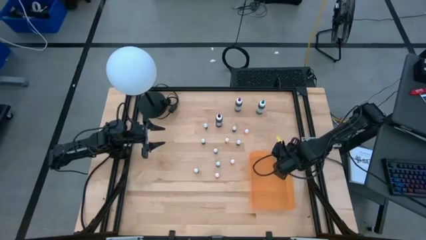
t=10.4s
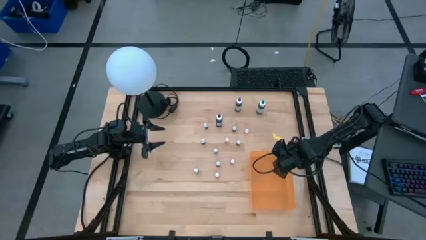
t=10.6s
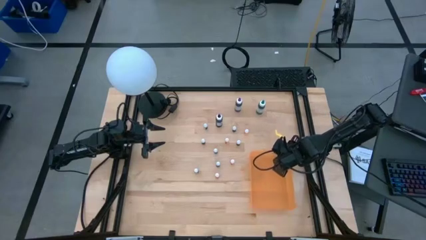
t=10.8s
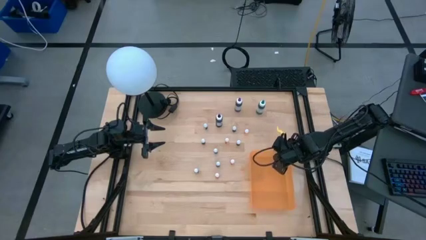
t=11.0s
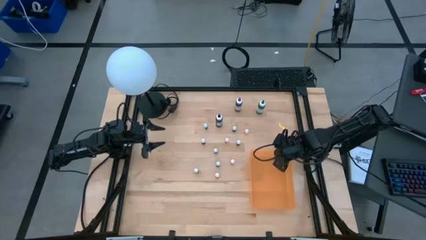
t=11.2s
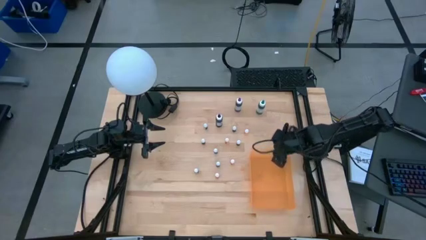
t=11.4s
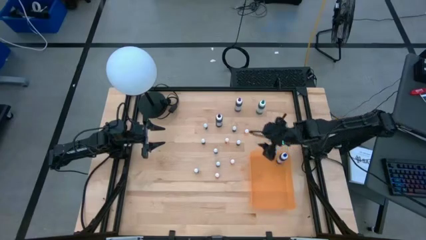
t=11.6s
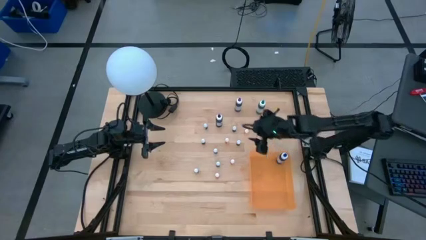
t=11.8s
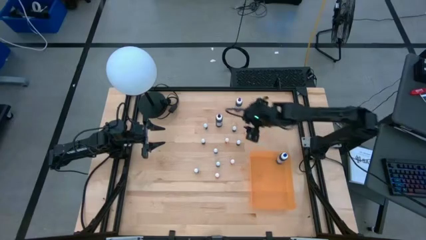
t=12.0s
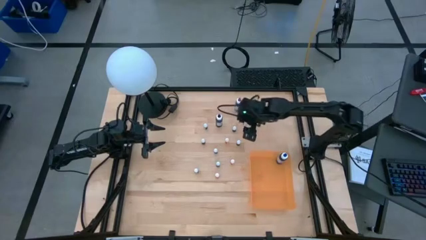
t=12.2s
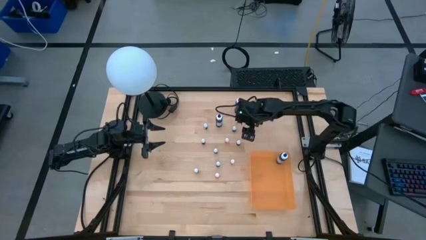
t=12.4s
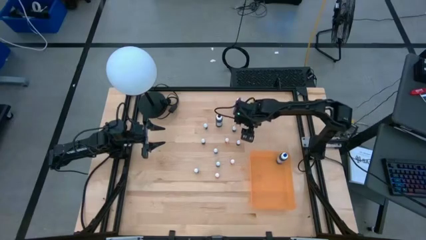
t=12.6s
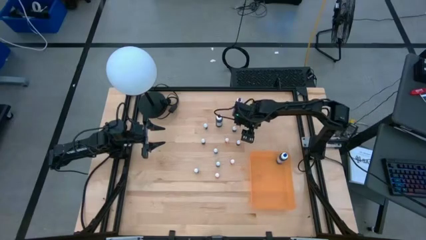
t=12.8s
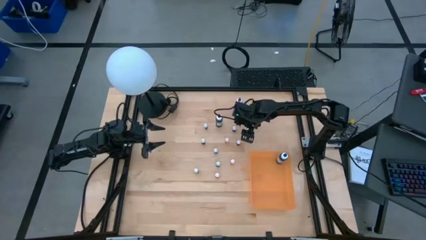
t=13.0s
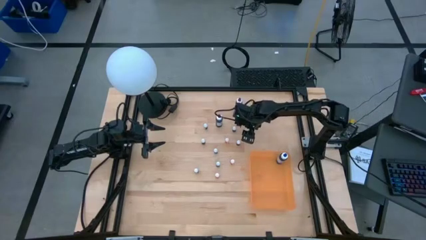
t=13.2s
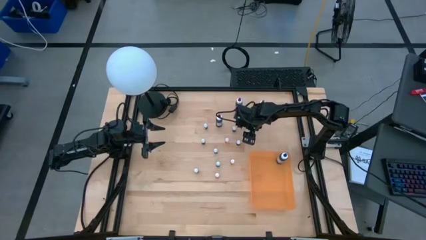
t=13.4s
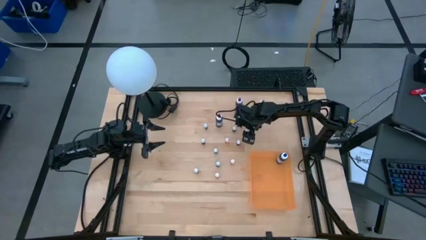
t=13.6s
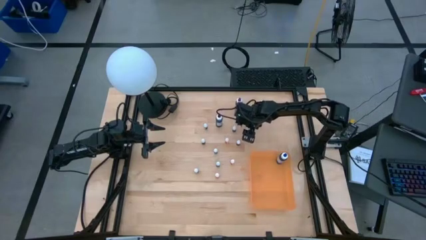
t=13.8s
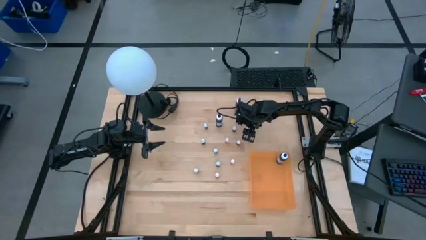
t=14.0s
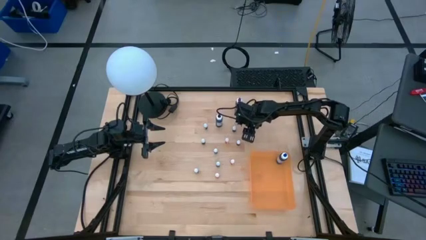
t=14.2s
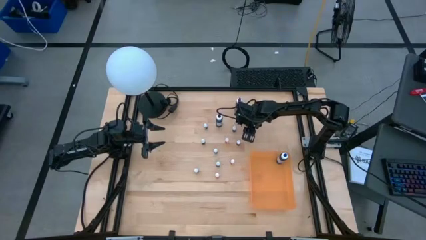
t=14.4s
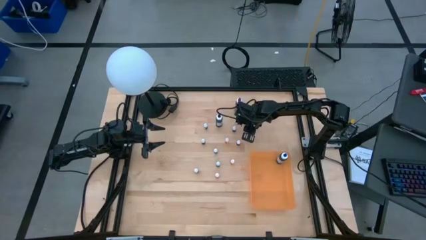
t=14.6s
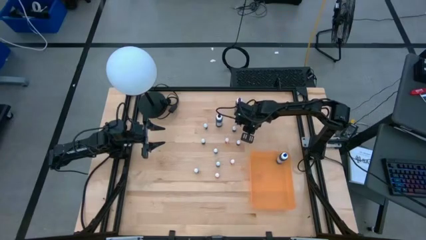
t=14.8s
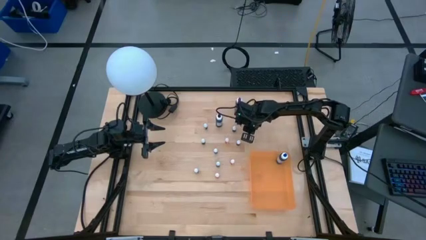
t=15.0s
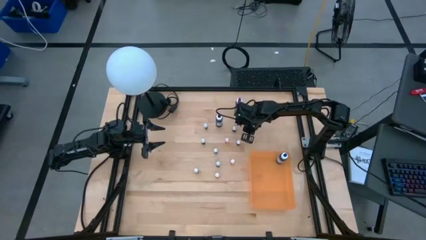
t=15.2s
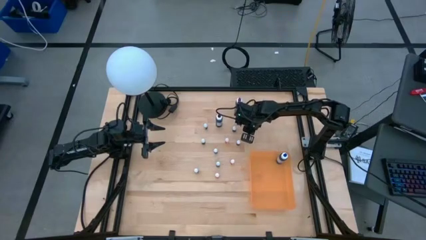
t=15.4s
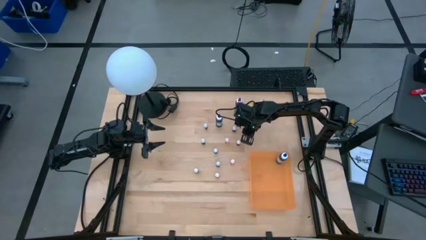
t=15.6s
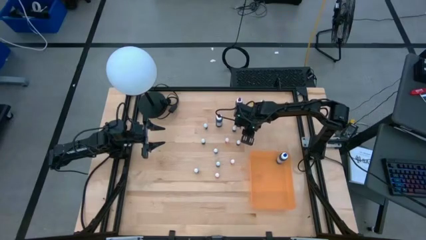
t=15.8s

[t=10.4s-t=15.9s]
Task: Pick & Place food coloring
Put the small yellow food coloring bottle into the orange bin

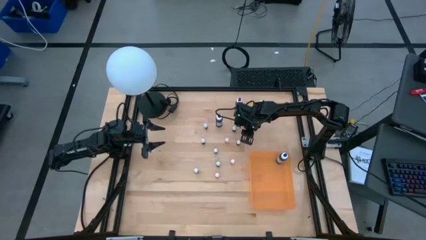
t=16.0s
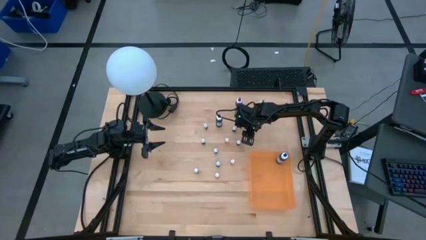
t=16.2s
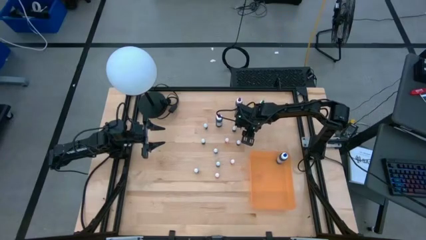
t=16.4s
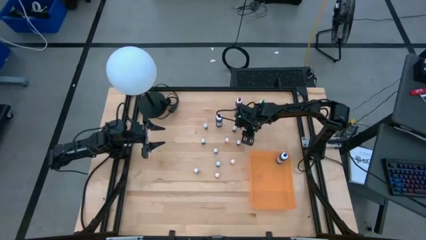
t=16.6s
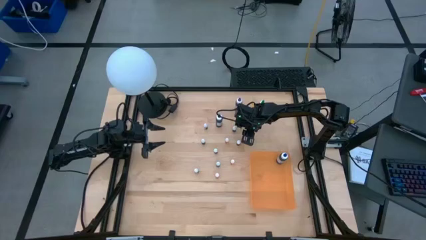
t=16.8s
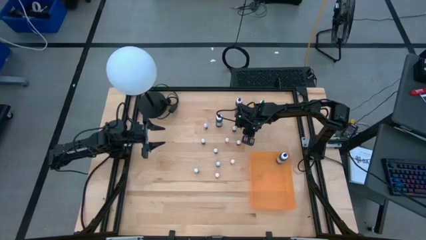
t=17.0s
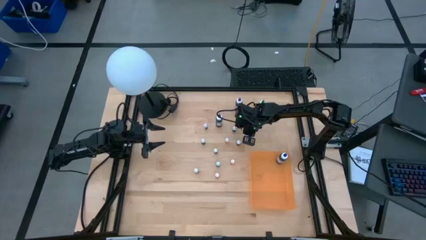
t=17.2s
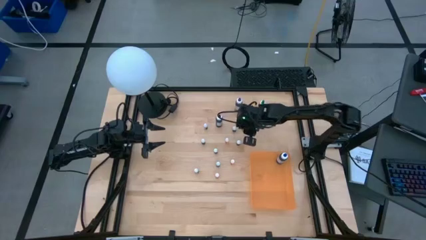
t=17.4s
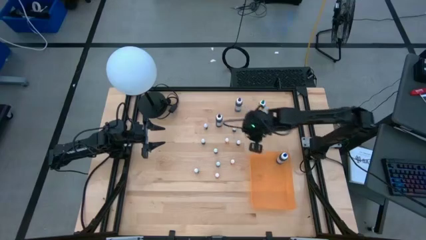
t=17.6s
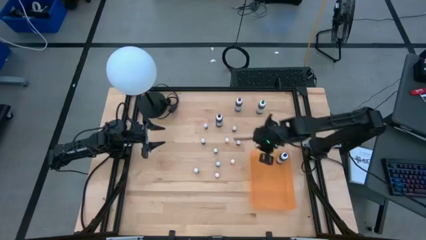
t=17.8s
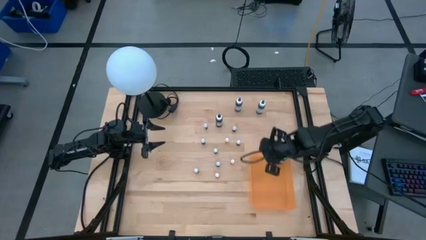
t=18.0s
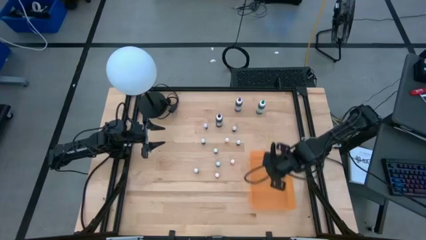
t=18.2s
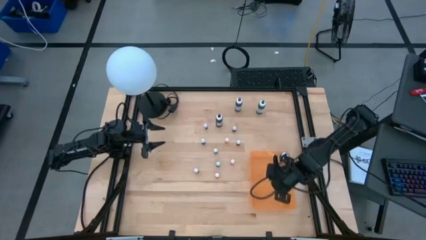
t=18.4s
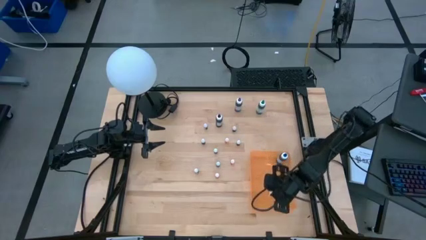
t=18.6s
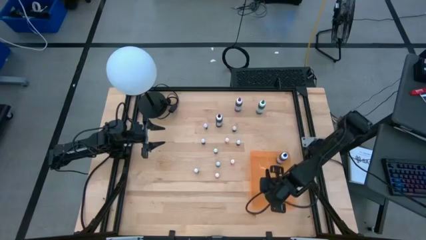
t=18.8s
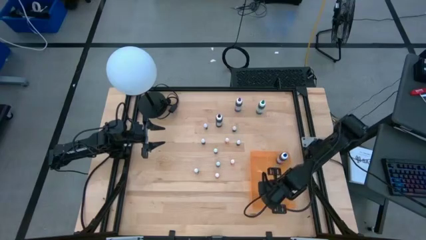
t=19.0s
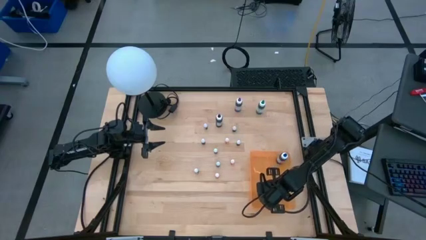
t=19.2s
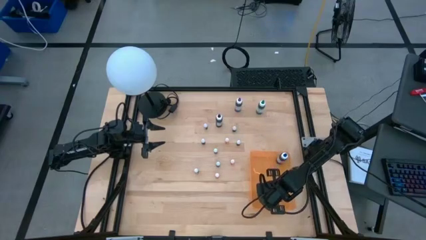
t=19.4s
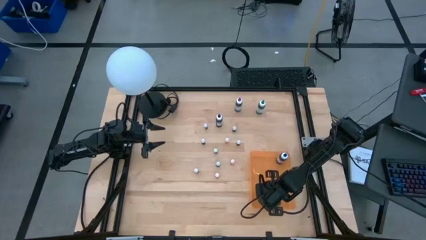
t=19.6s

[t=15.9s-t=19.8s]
Put the small yellow food coloring bottle into the orange bin

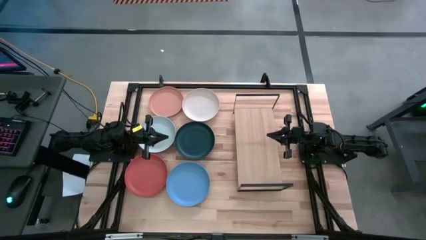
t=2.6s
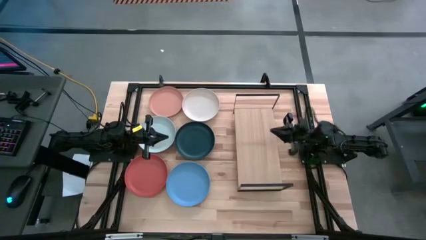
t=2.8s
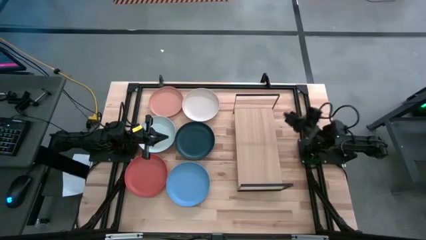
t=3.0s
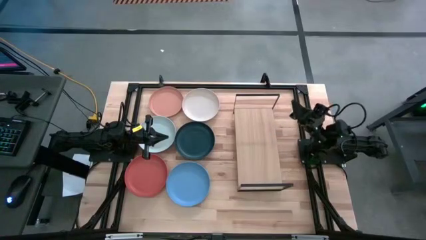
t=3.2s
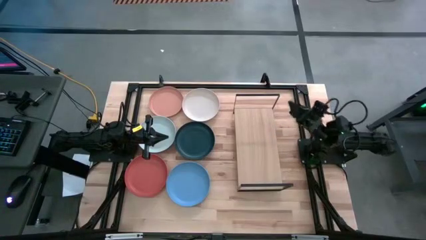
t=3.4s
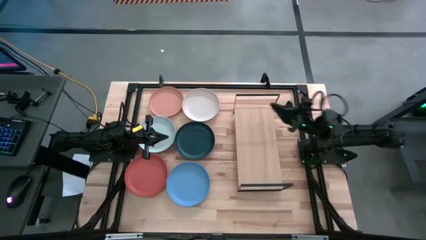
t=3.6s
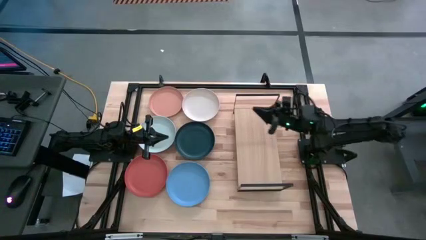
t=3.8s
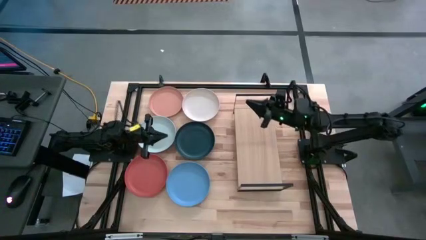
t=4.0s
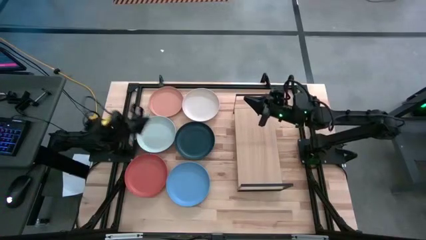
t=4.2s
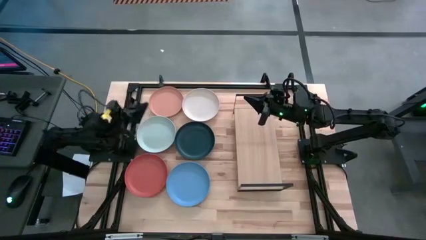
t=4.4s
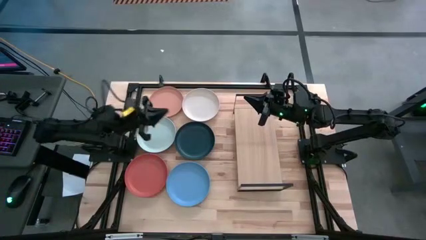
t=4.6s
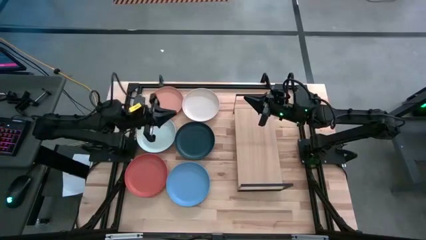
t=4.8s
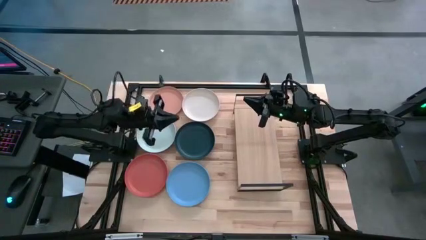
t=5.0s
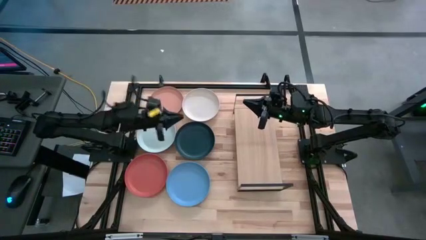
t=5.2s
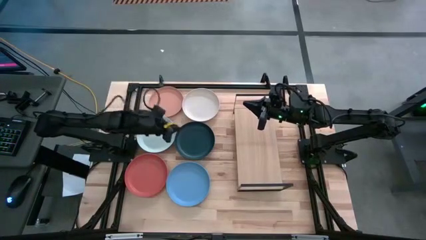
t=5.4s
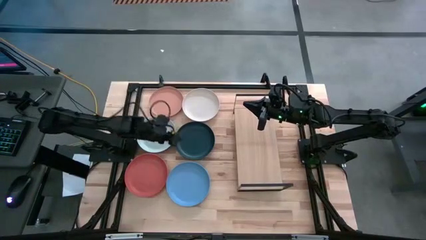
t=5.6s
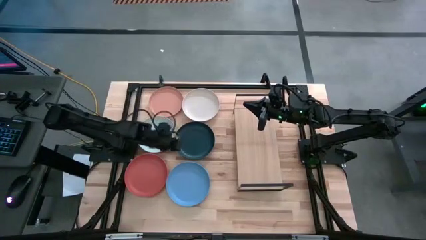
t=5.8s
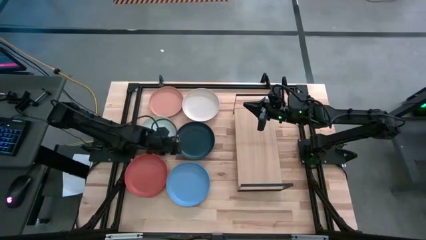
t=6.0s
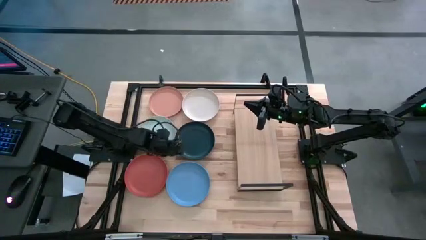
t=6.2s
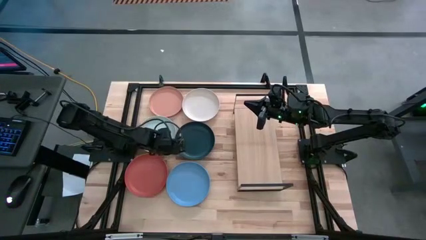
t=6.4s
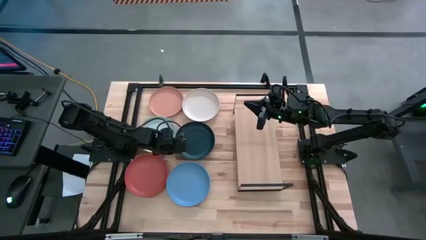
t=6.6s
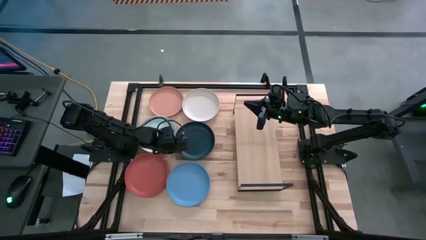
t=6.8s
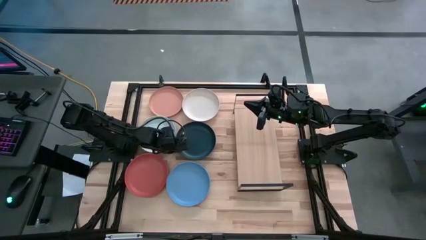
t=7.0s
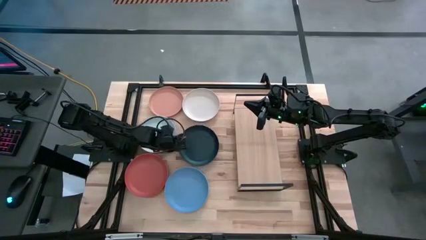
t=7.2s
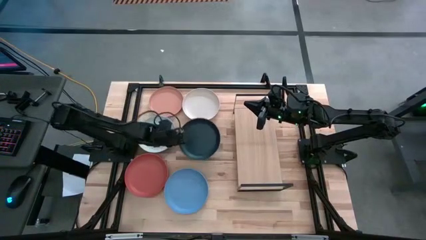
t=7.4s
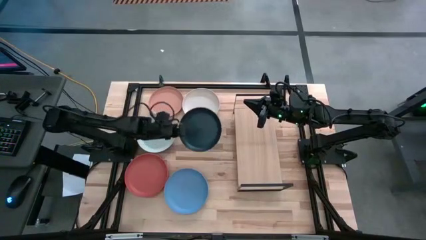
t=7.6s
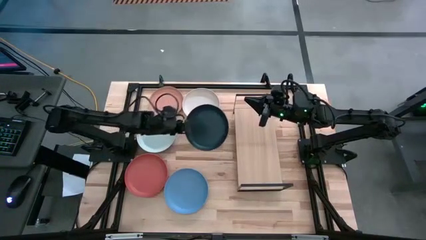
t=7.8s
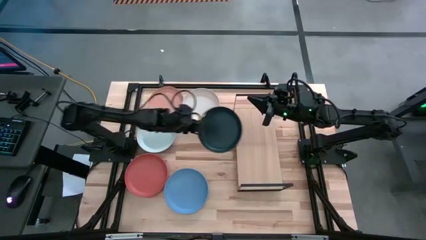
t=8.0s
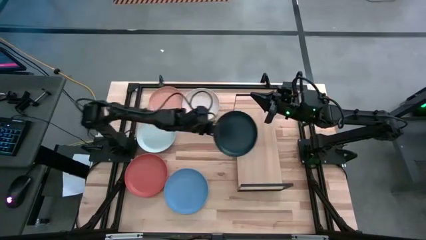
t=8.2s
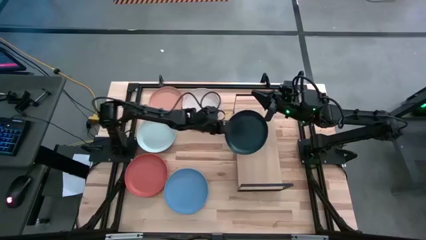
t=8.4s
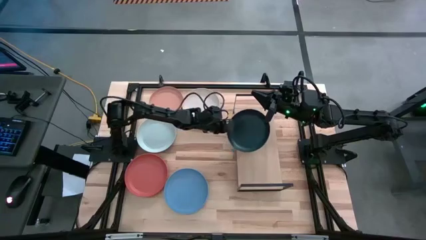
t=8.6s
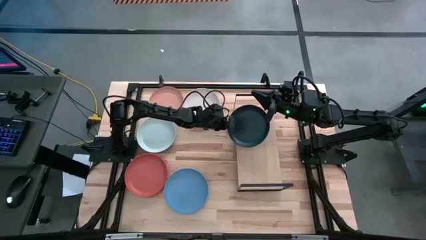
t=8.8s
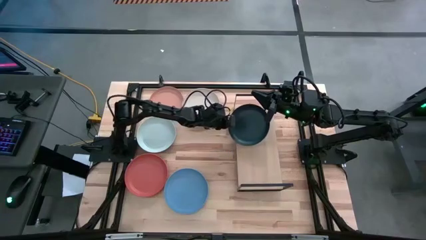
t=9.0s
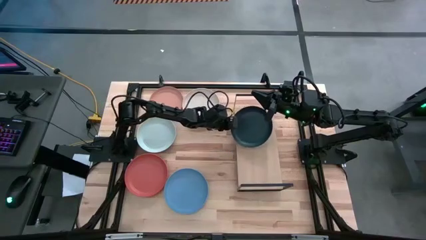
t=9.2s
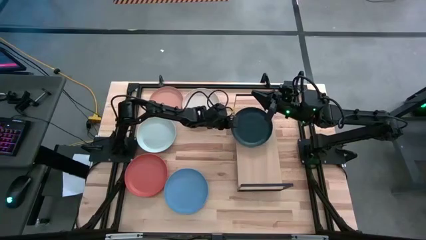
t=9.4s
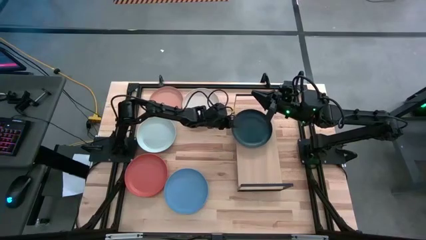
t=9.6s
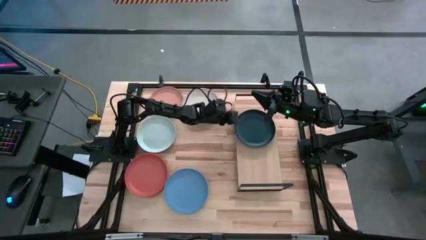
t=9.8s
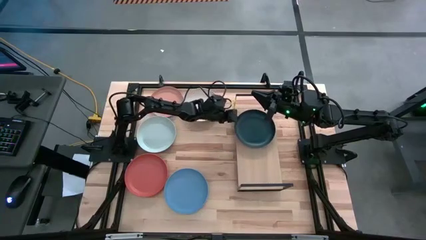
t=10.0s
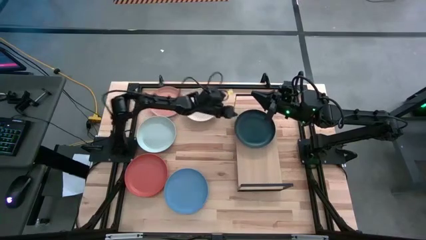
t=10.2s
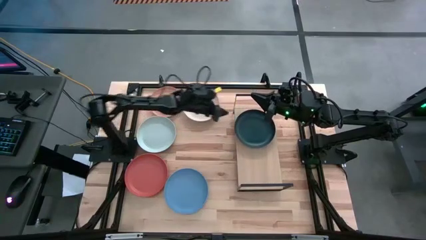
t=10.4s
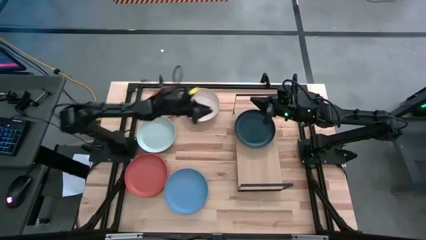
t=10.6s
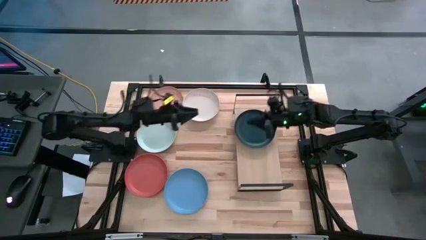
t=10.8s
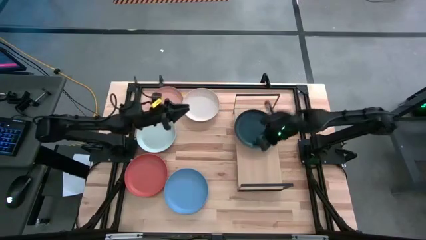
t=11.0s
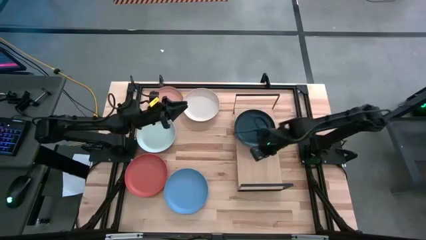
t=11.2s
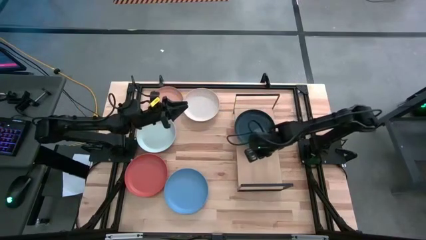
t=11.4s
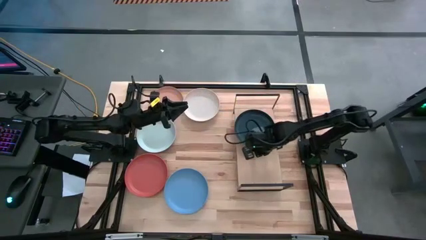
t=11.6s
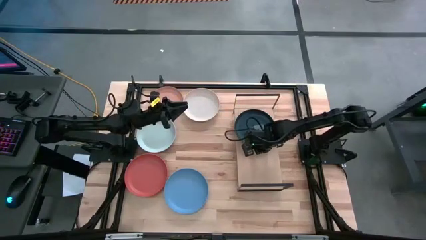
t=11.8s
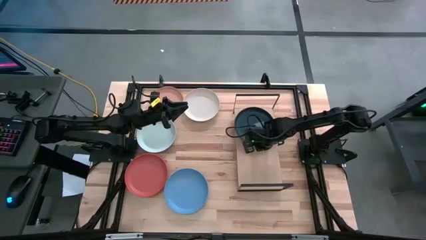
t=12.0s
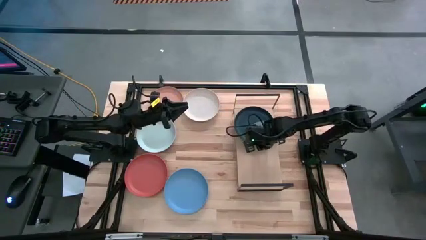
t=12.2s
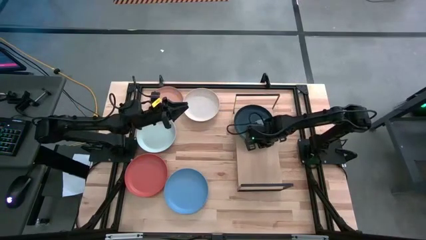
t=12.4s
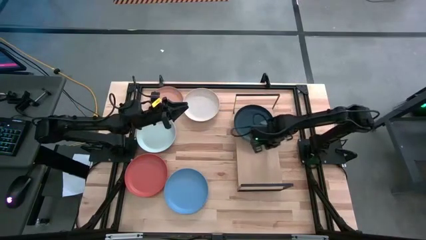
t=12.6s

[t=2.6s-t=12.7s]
Task: Place and stack plates onto a shelf
Put the black plate on the shelf
